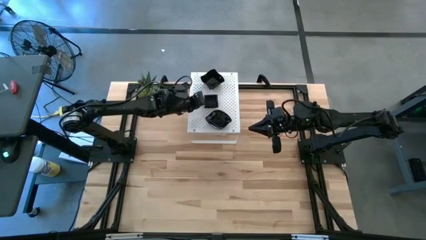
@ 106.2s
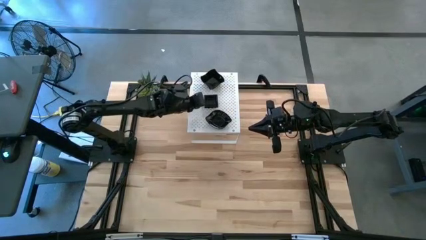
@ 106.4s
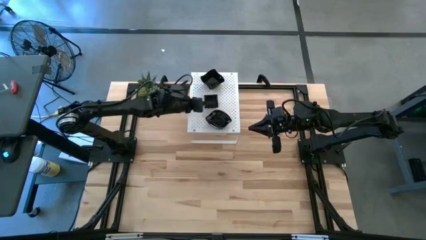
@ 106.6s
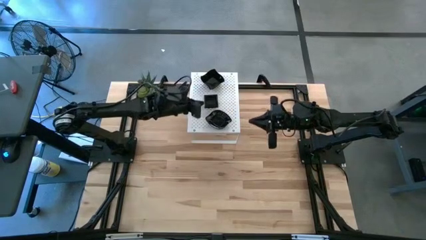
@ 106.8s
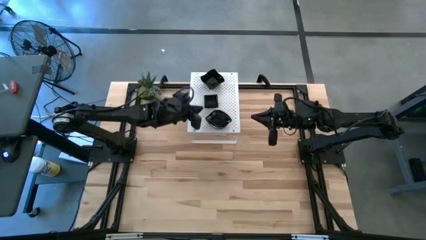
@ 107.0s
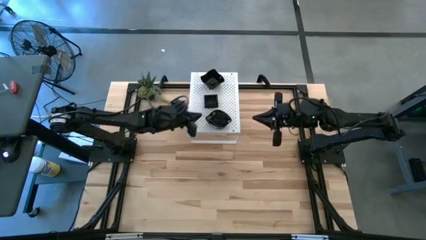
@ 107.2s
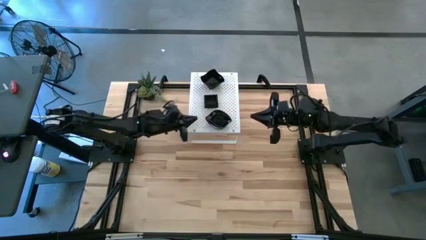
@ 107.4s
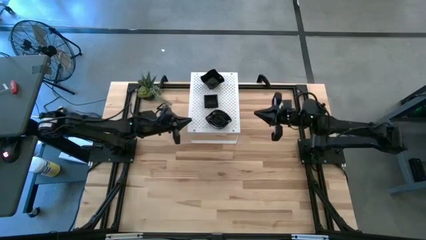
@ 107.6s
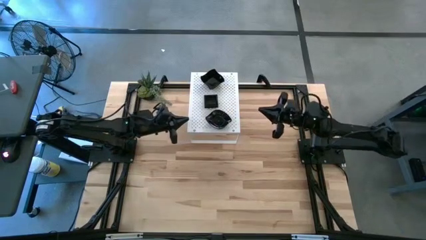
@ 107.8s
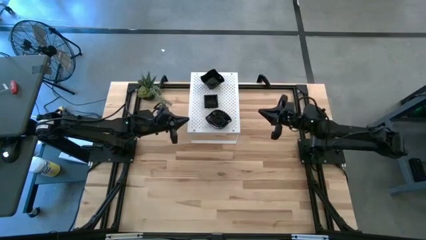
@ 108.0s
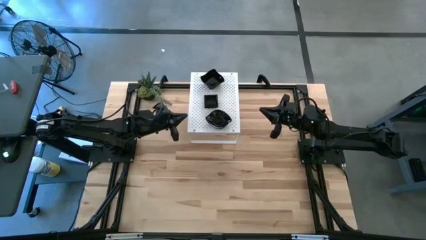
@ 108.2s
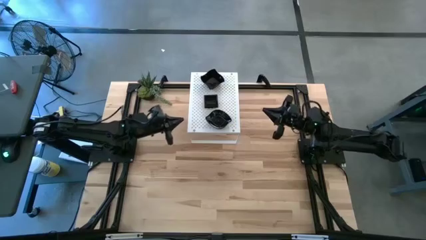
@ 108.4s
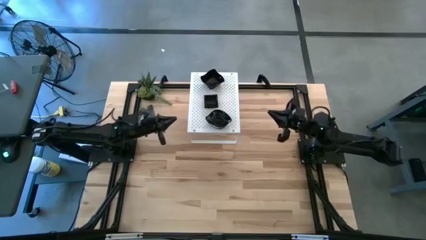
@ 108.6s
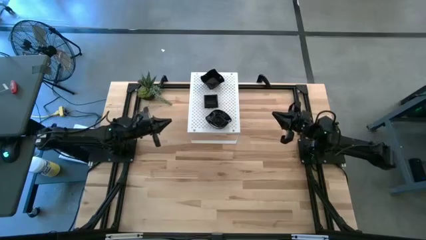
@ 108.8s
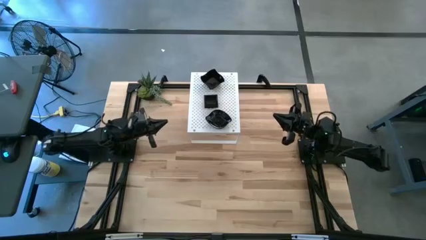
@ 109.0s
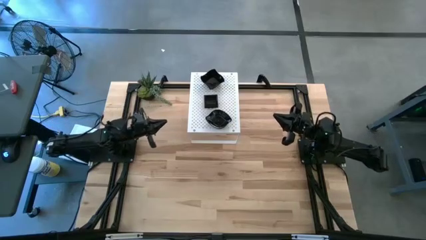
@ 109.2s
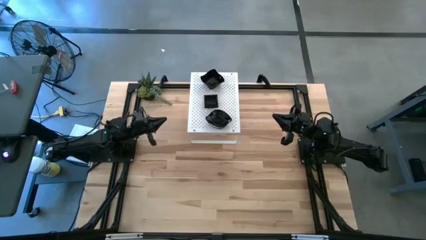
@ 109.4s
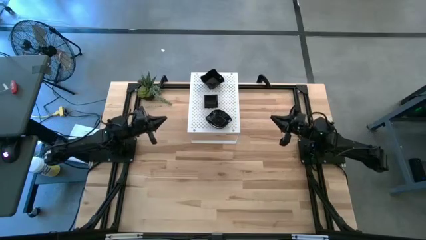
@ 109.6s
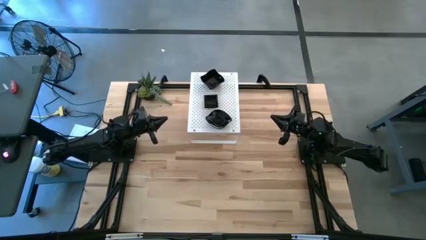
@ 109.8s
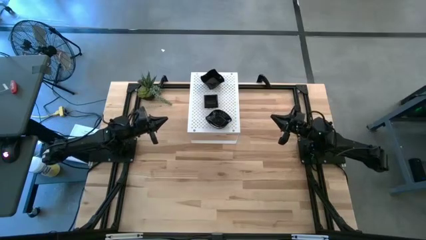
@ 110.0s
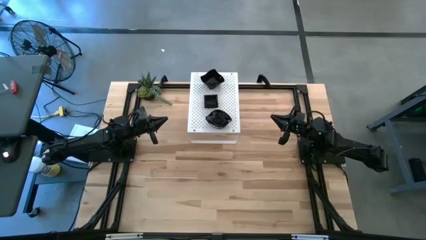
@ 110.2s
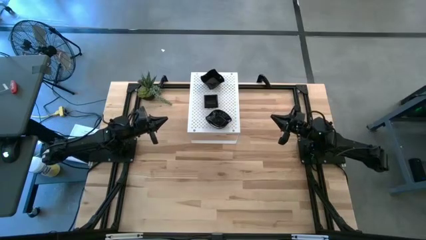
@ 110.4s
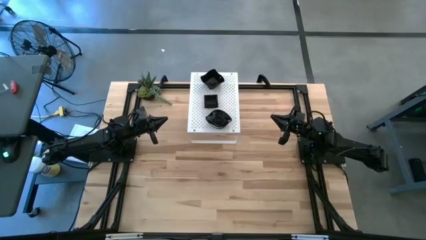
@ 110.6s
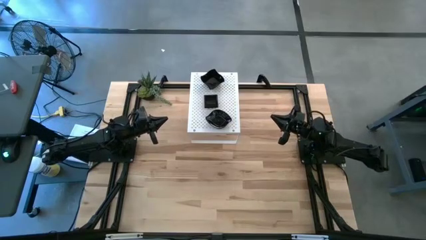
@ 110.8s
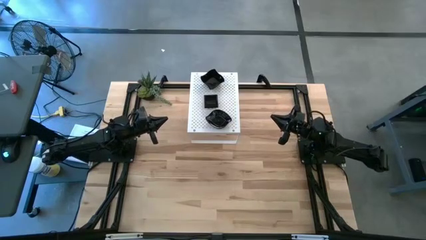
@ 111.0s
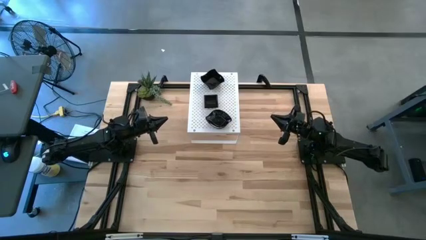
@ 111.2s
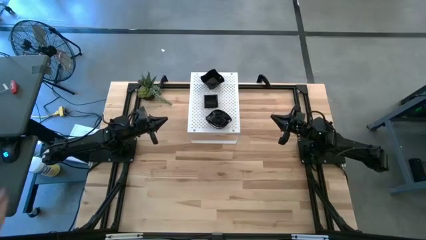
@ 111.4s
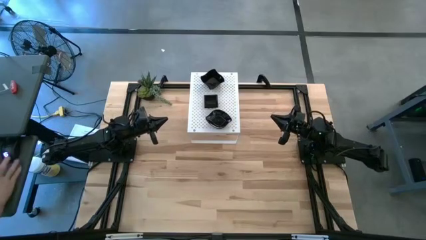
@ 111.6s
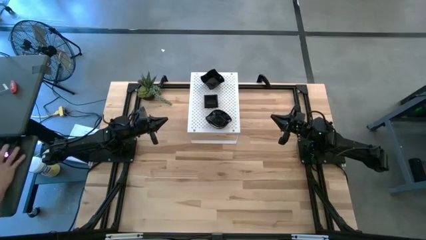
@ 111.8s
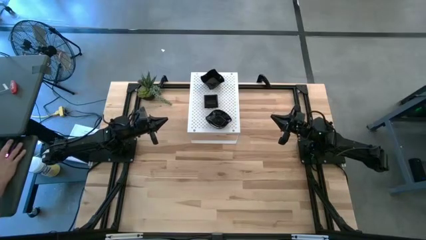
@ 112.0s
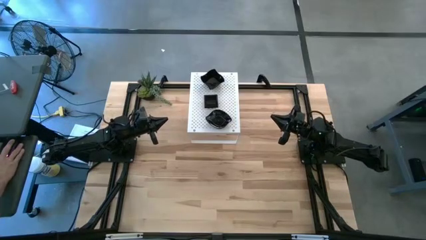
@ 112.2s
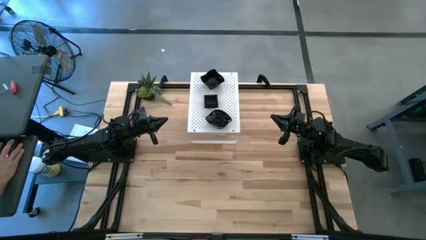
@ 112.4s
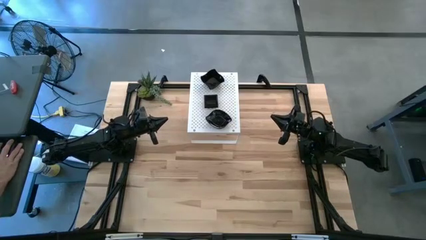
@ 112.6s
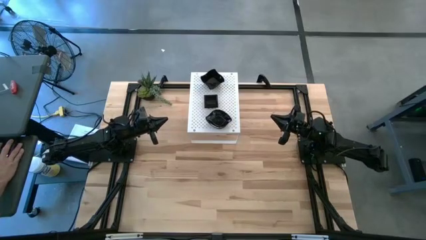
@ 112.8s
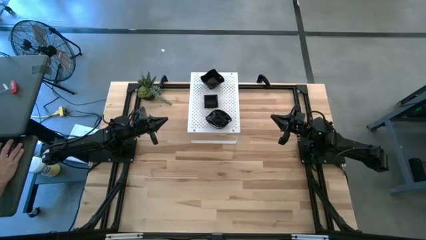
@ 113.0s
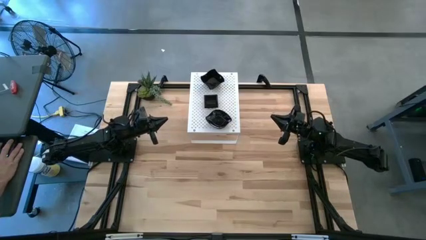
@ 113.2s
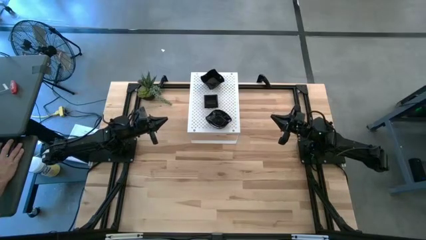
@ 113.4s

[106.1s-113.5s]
Task: Pick & Place Mini shaped plates
Return to home position

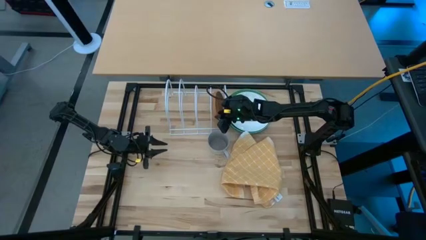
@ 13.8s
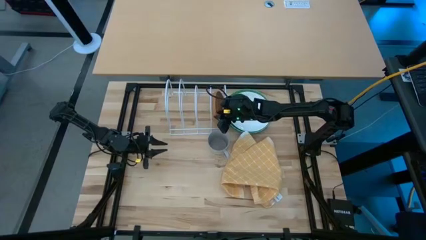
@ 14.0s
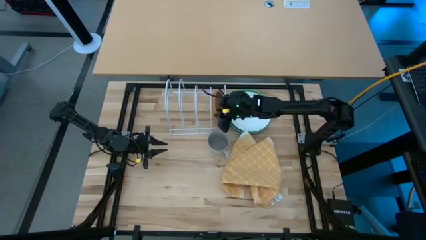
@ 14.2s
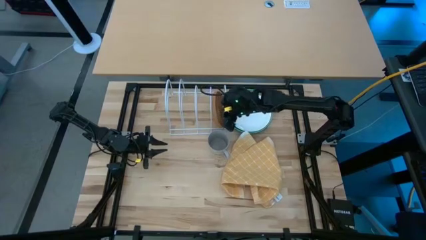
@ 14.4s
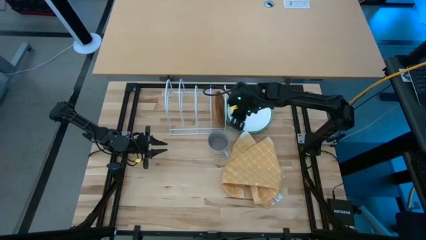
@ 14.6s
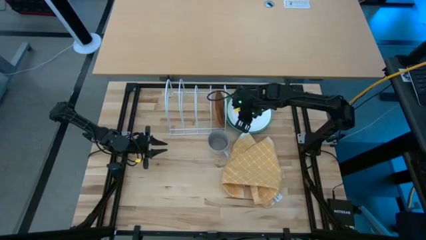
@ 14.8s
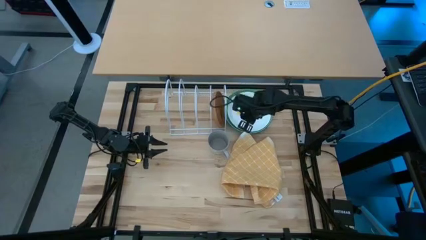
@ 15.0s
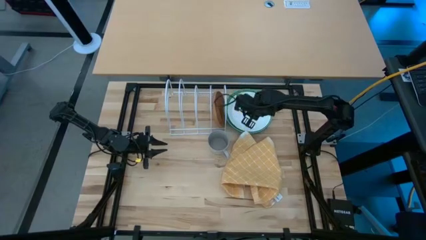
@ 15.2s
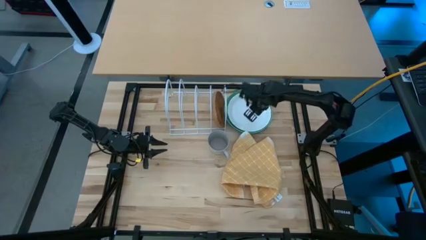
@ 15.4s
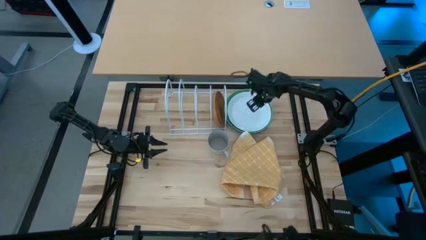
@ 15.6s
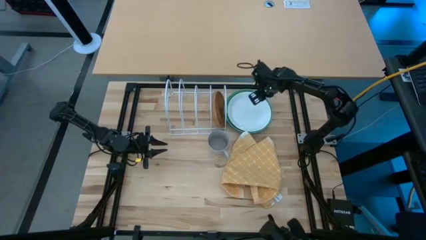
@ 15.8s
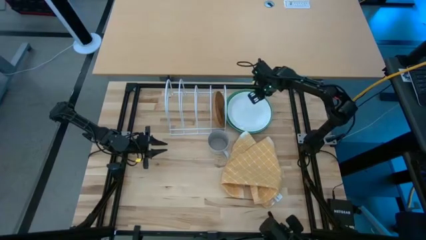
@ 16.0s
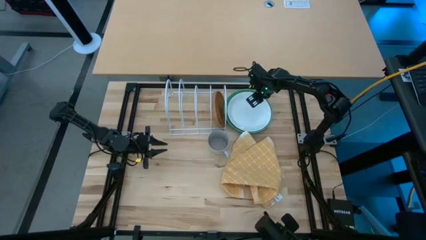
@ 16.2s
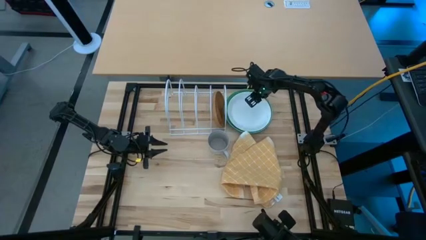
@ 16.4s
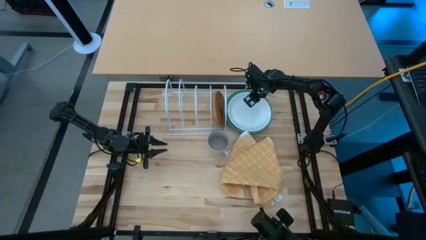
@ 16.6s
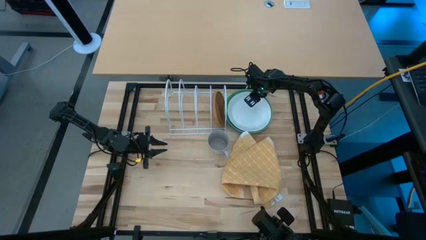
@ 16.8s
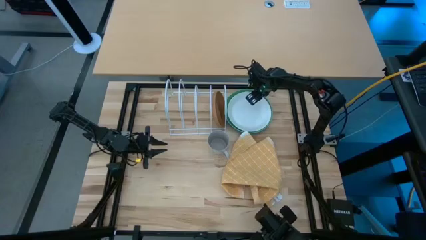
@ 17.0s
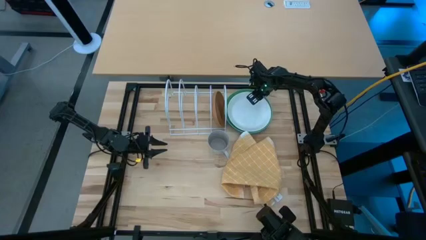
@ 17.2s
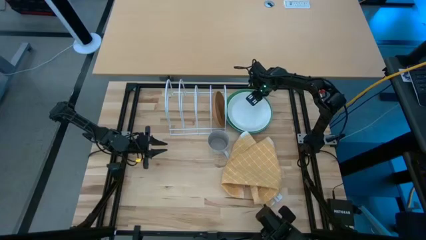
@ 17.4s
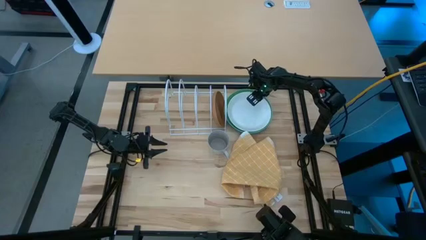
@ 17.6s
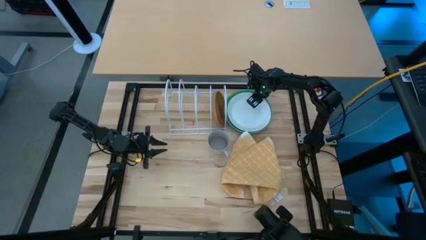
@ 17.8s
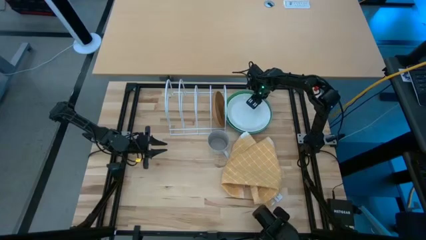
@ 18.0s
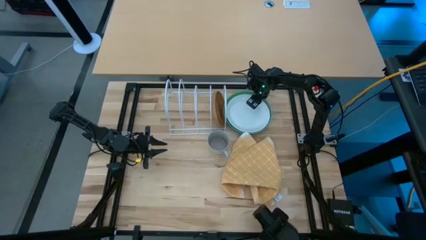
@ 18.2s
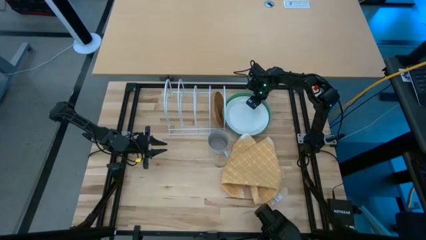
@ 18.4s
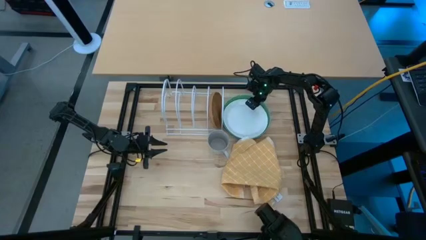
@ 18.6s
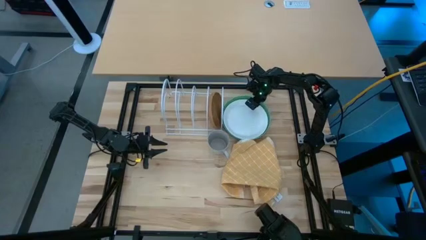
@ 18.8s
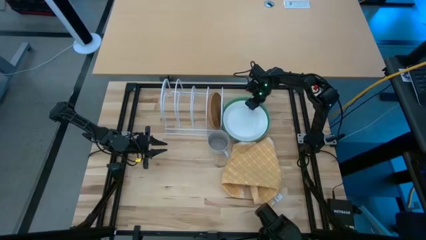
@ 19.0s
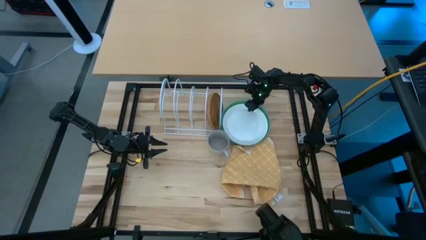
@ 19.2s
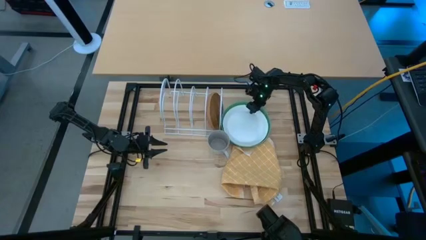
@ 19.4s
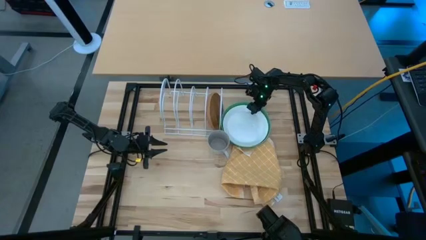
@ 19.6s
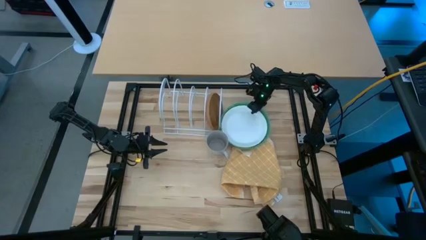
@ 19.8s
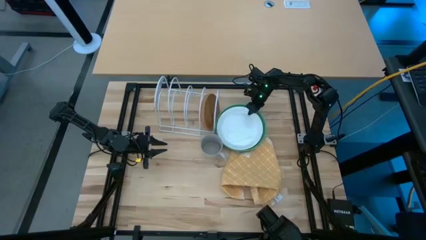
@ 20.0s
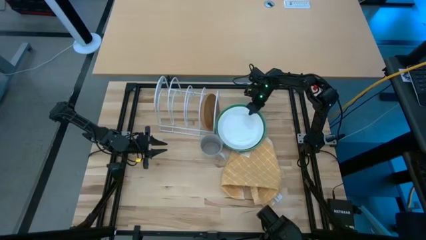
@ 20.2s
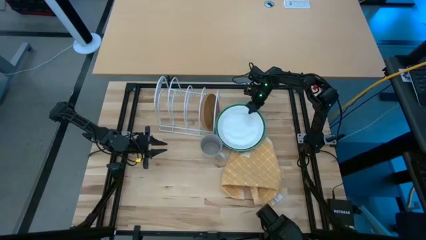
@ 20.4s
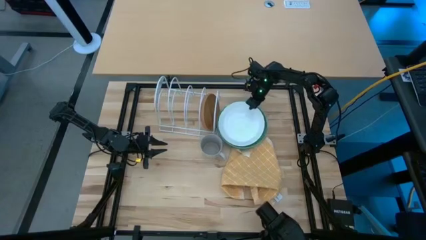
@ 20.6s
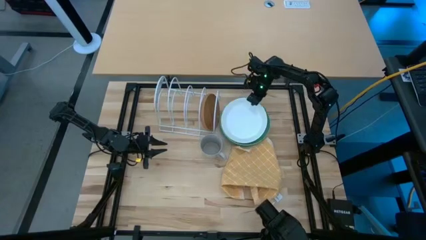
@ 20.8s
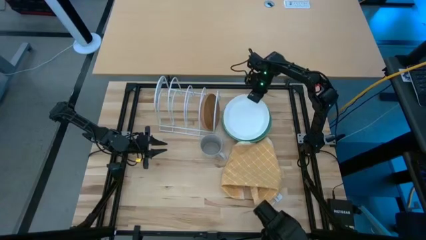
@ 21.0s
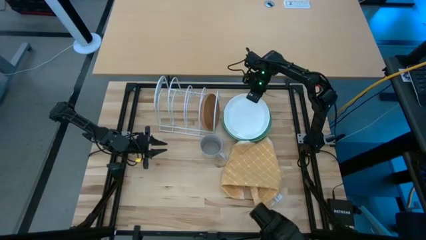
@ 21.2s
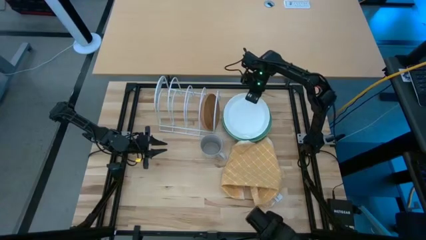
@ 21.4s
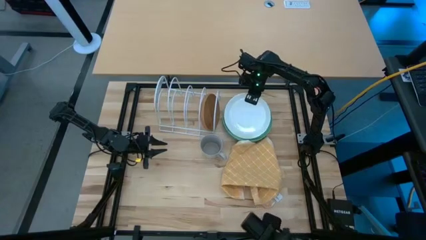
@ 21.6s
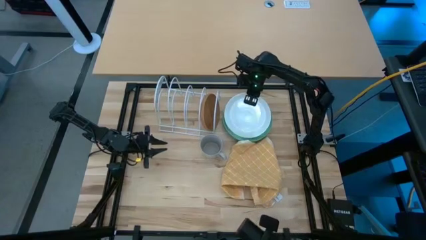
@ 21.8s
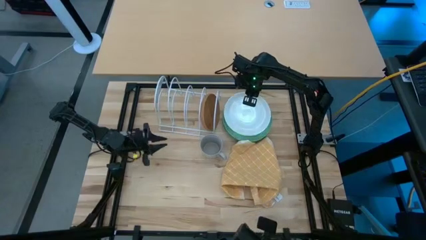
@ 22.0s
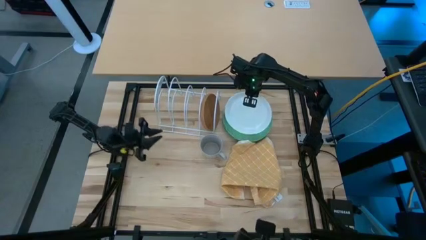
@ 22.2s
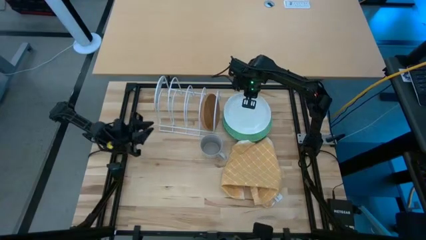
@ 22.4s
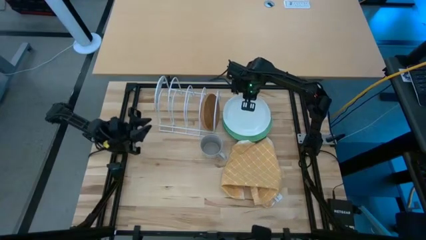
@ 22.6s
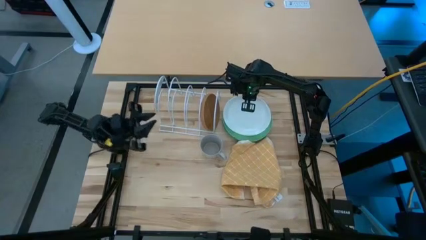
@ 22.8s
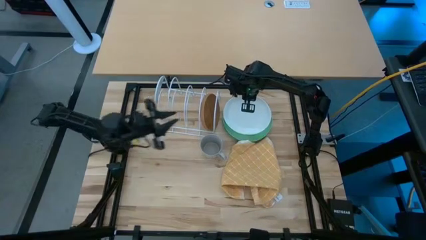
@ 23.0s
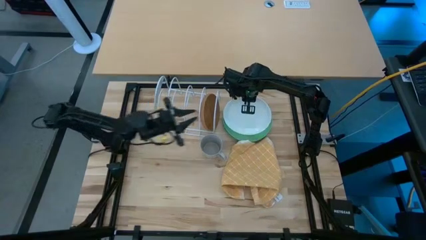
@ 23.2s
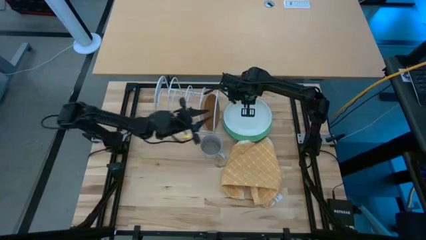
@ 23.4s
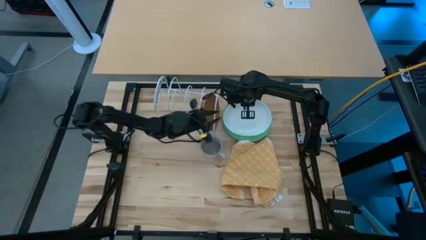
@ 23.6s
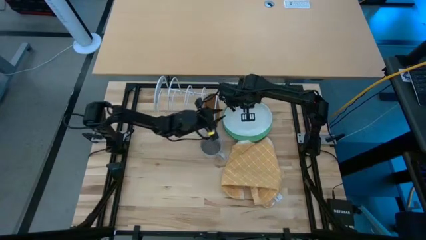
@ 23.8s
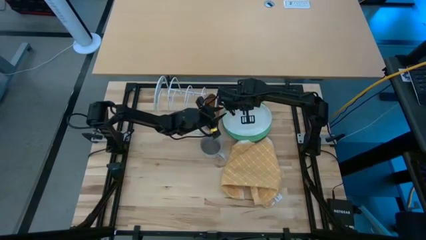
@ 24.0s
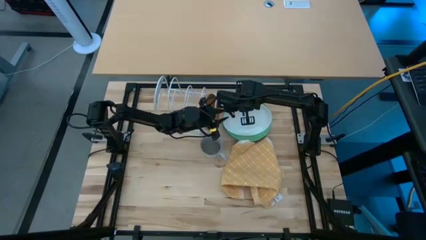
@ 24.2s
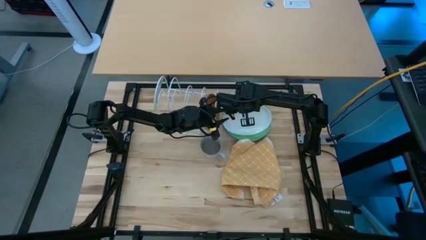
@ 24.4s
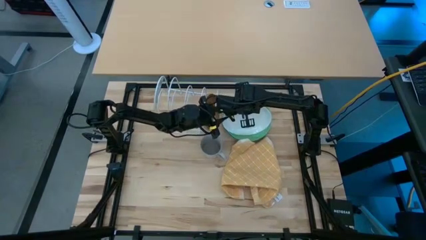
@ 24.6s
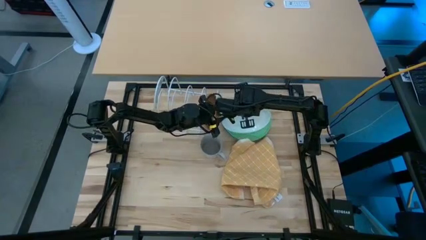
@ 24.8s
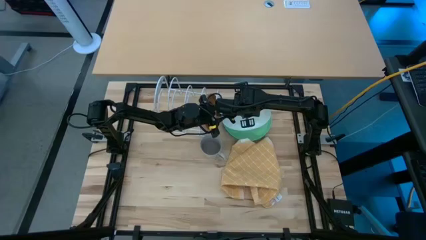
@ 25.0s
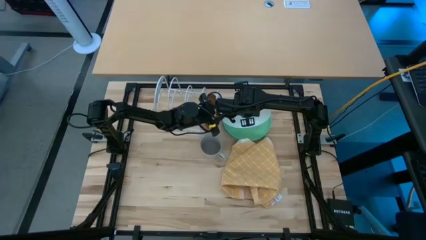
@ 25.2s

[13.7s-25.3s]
Task: Sort dishes
Put the white plate in the dish rack
